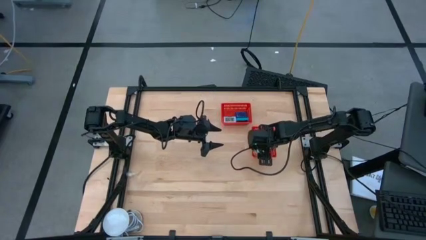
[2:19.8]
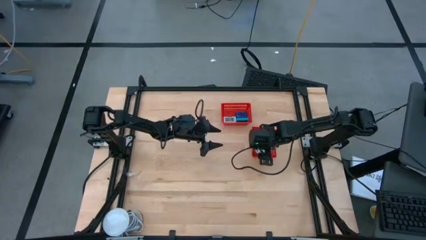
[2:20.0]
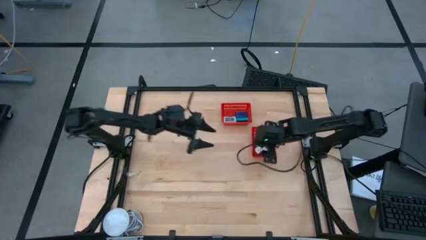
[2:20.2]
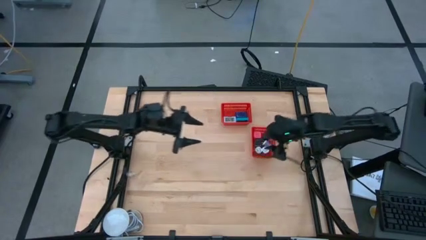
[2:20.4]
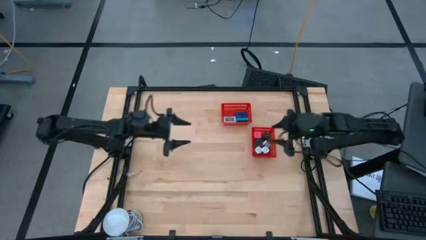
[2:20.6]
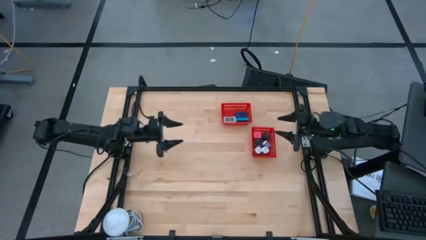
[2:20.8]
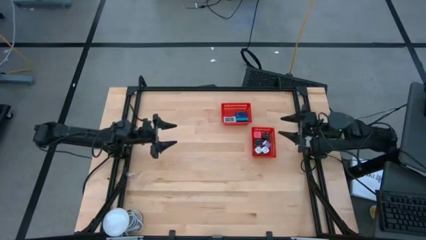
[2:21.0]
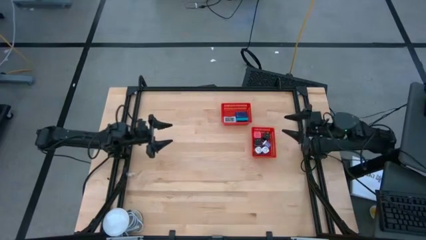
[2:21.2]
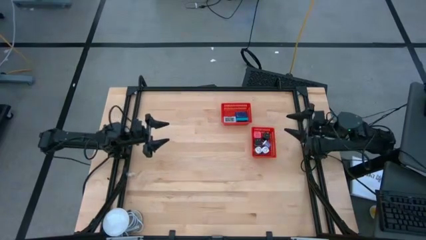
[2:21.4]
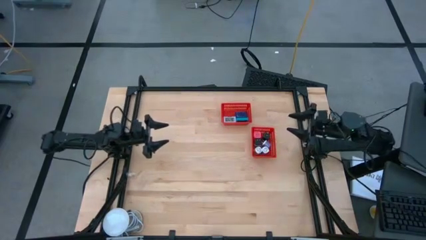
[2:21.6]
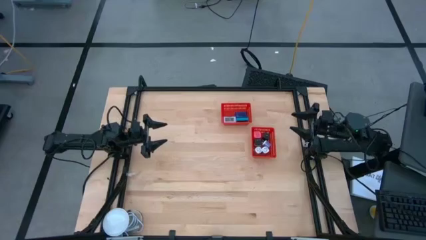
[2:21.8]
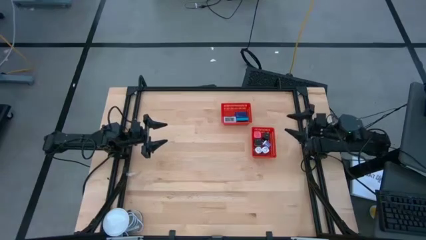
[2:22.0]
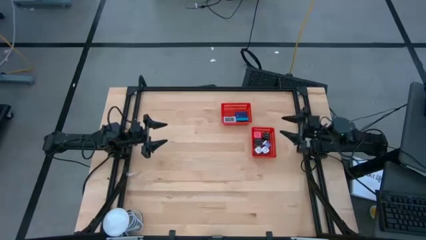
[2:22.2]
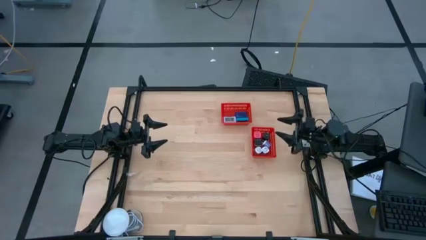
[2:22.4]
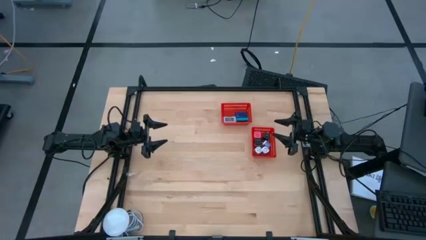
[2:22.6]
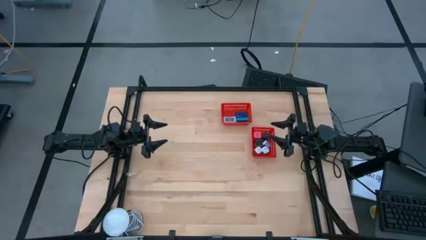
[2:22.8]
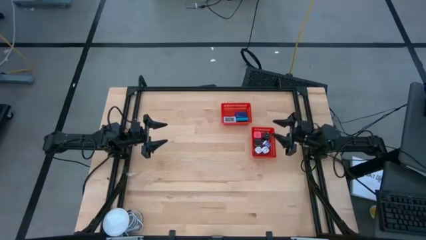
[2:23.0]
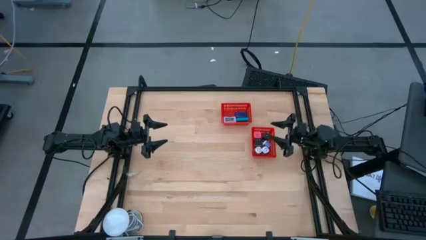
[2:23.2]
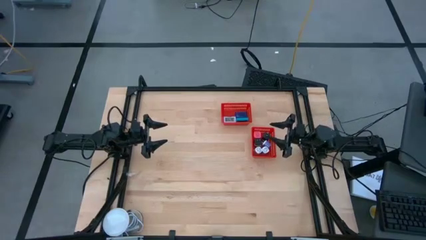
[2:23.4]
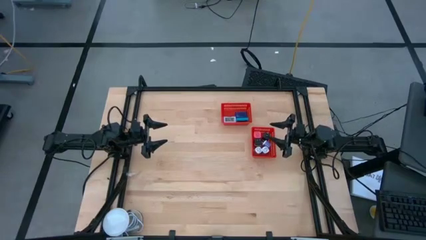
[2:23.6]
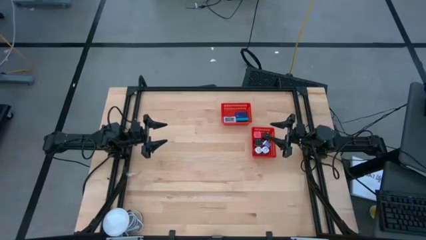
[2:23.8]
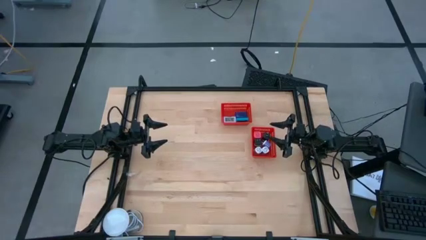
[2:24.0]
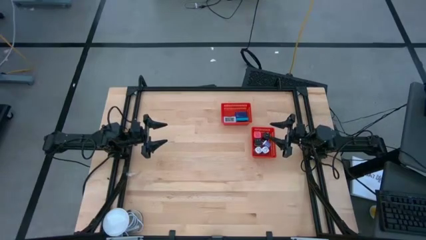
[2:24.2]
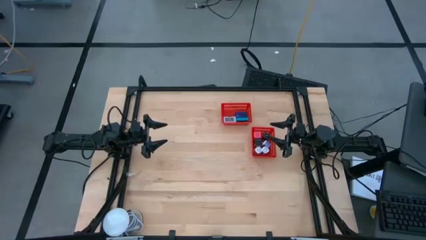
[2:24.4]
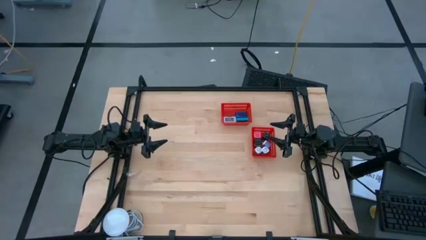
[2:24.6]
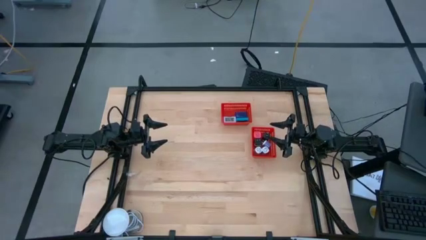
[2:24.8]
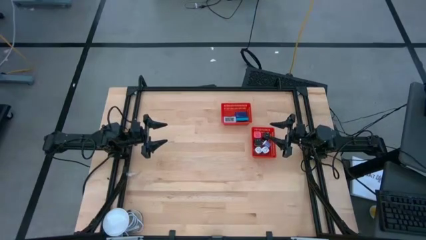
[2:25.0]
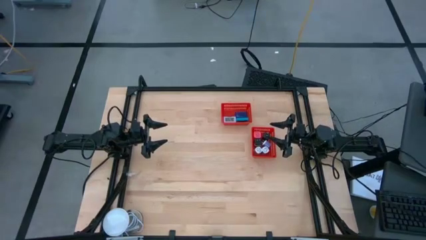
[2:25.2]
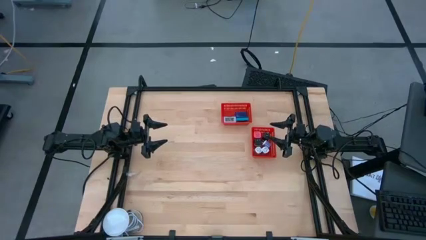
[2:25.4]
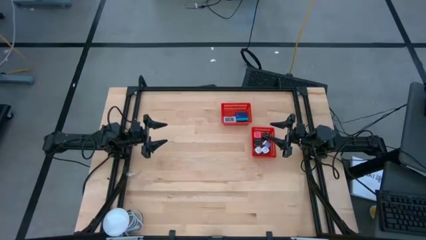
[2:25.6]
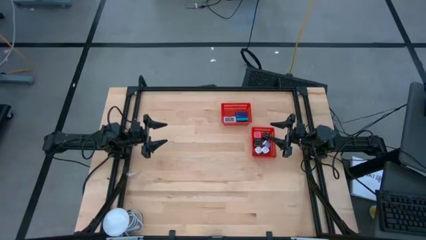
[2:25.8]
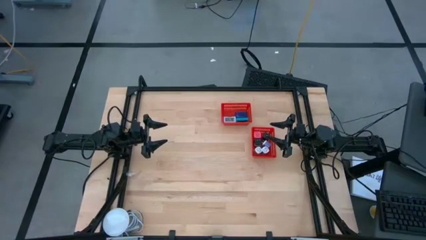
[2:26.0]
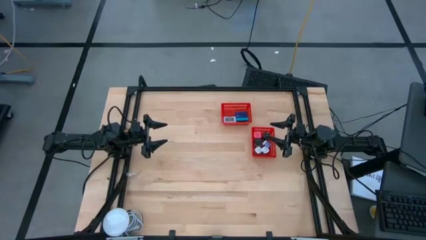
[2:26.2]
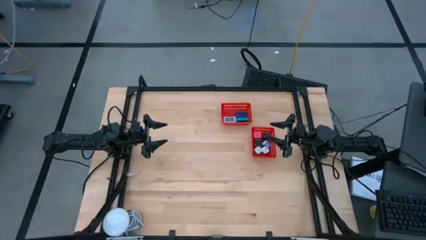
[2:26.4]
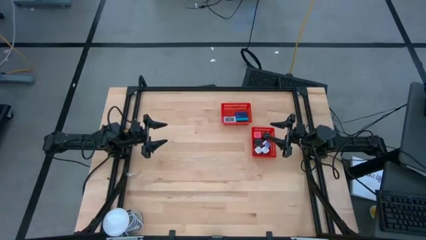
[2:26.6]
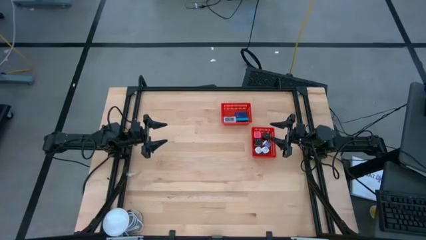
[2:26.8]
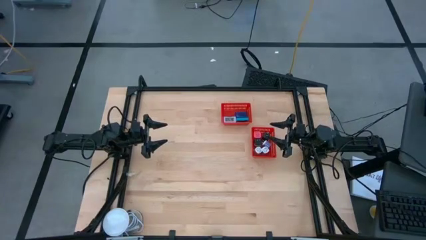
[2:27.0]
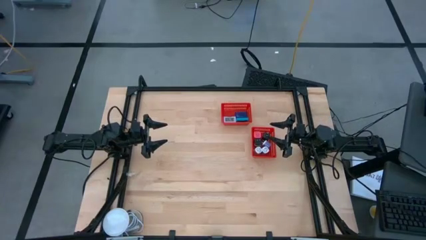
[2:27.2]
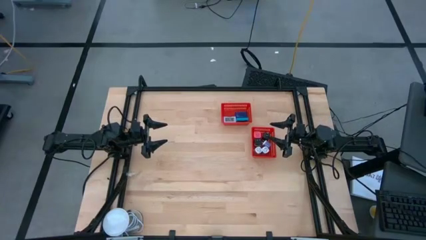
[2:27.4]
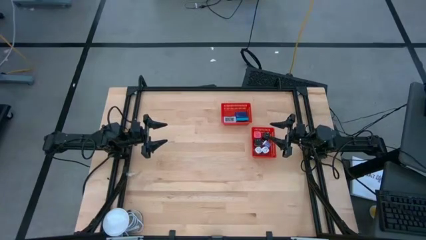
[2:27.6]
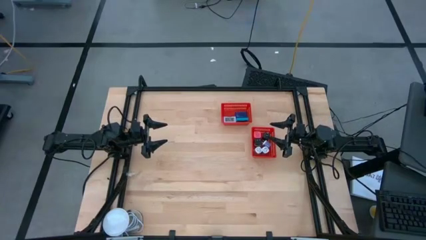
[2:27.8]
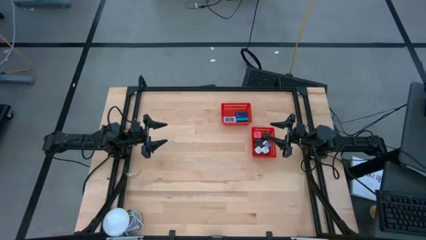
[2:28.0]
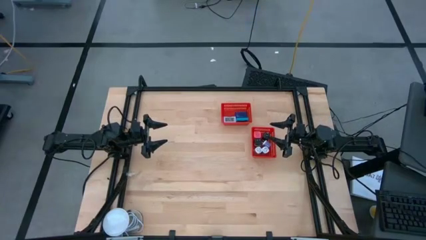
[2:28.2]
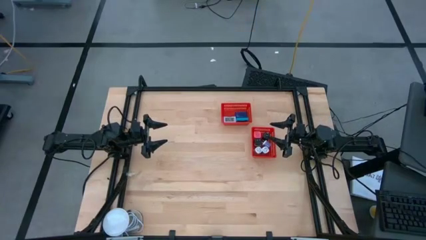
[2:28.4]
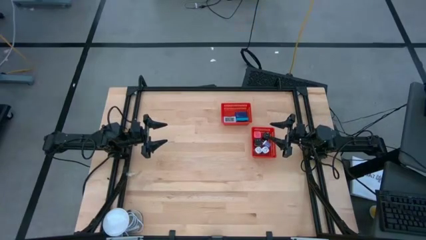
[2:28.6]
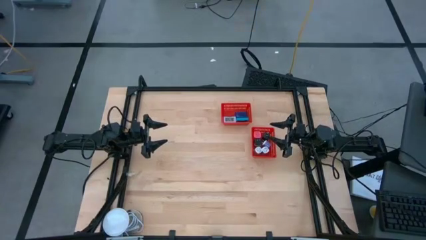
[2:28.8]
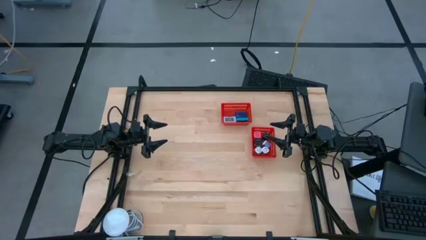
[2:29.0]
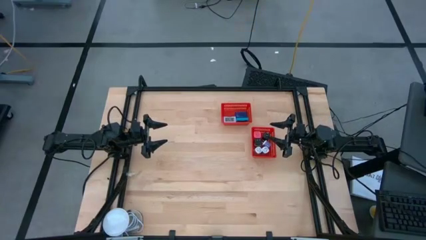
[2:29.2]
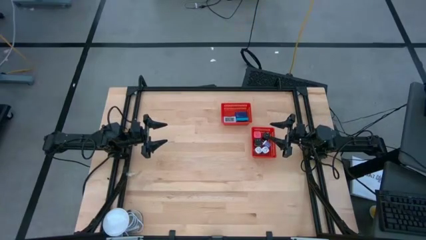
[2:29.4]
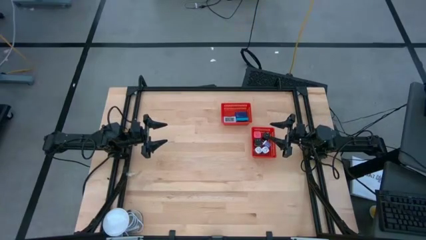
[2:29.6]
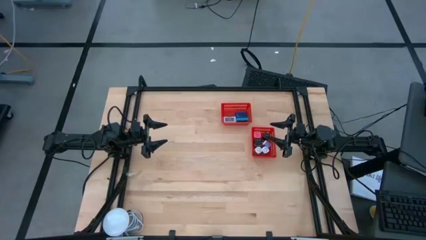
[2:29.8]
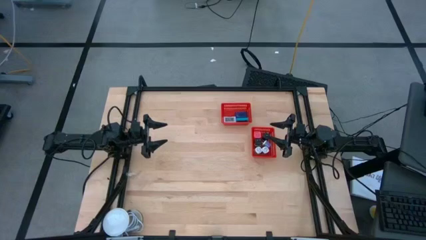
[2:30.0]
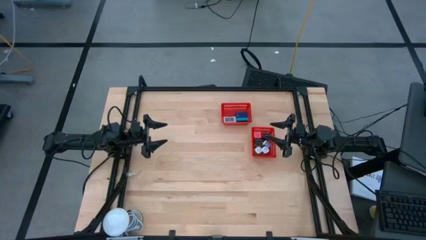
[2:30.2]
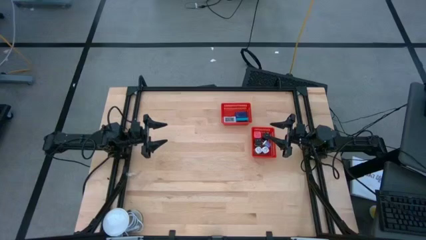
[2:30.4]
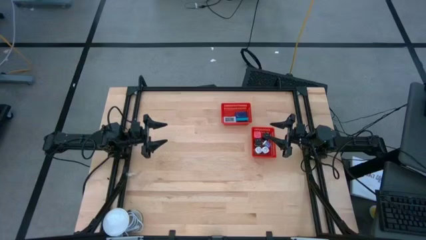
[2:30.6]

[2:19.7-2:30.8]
Task: Pick & Place Office items
Return to Home Position

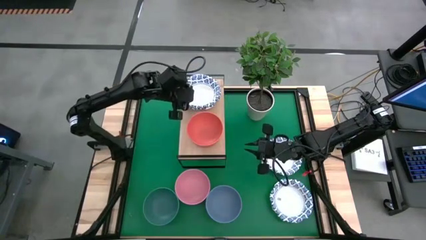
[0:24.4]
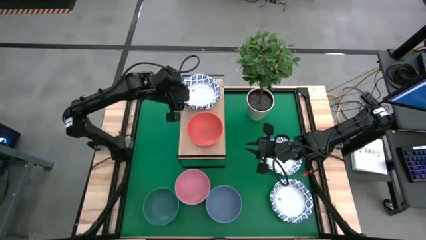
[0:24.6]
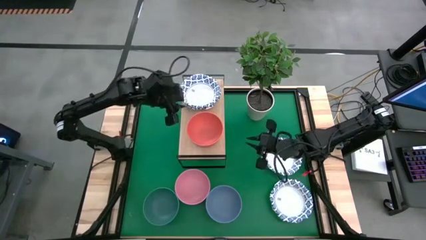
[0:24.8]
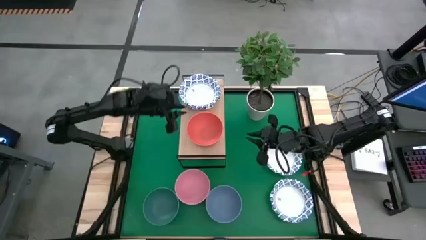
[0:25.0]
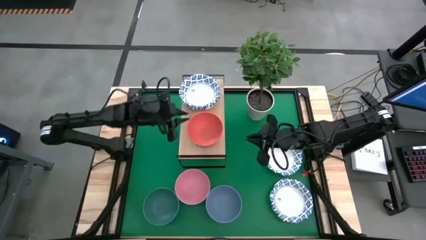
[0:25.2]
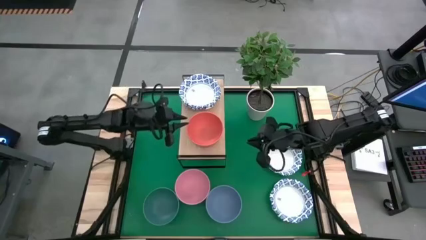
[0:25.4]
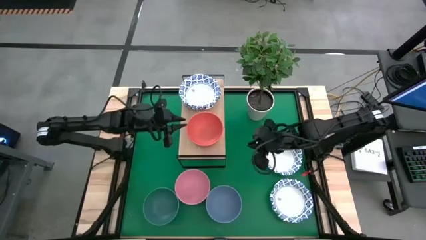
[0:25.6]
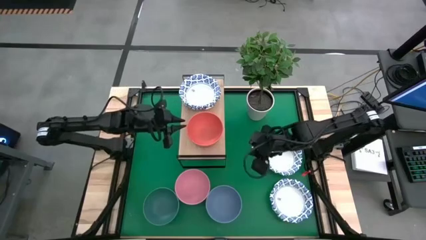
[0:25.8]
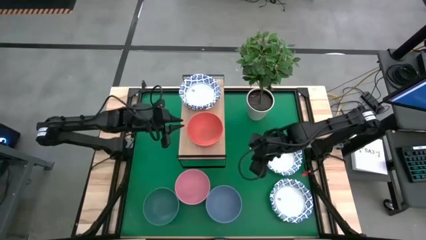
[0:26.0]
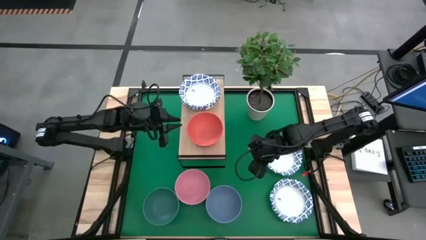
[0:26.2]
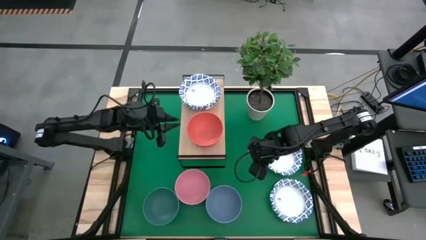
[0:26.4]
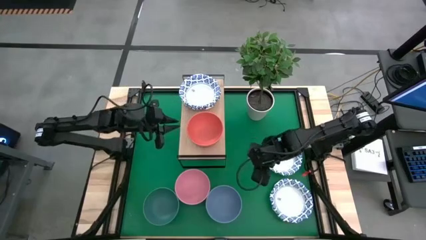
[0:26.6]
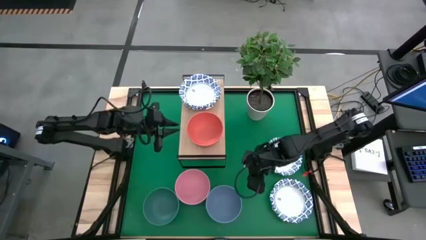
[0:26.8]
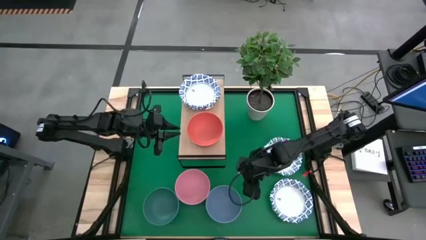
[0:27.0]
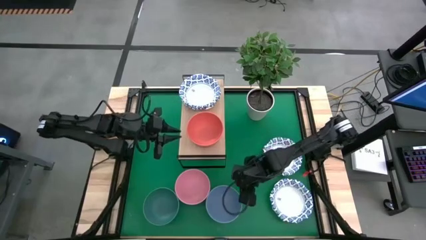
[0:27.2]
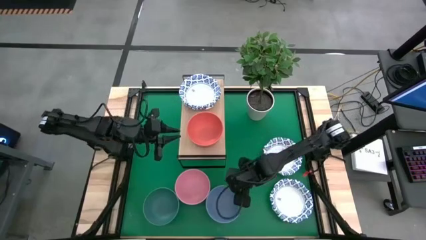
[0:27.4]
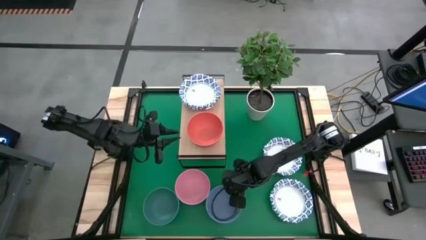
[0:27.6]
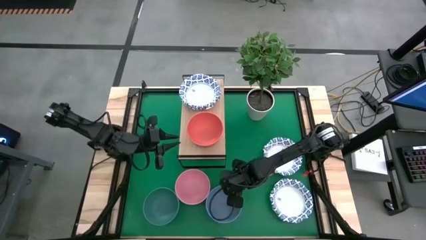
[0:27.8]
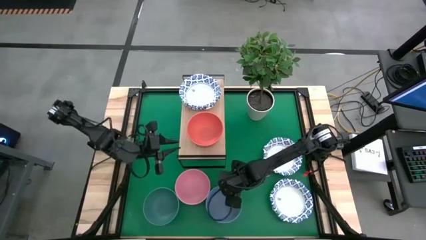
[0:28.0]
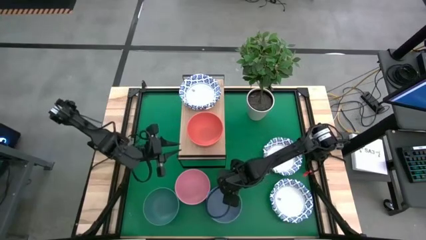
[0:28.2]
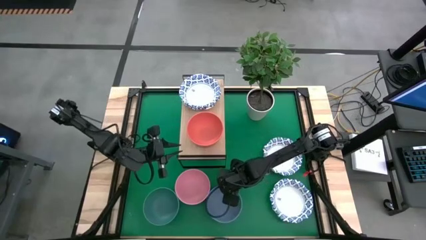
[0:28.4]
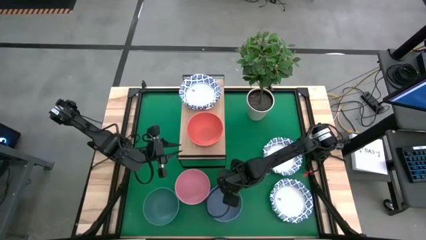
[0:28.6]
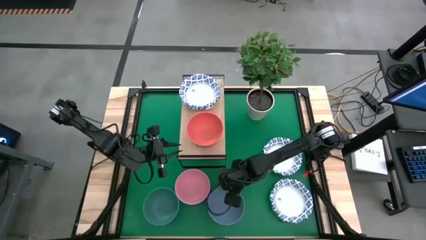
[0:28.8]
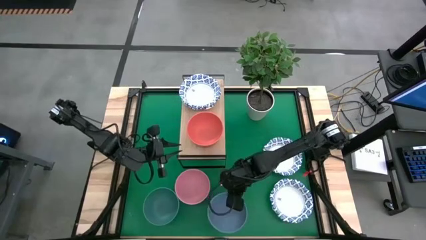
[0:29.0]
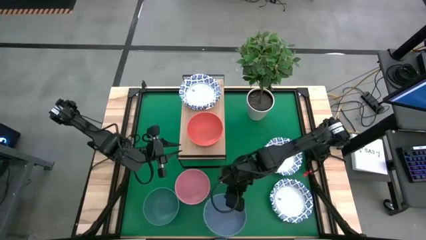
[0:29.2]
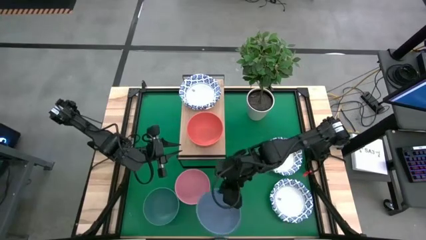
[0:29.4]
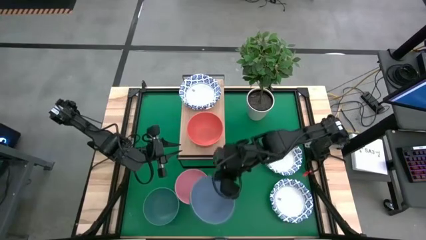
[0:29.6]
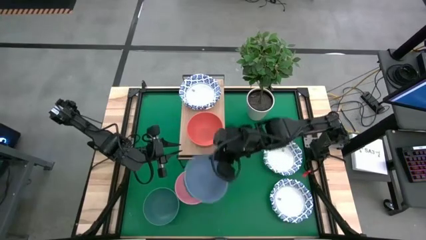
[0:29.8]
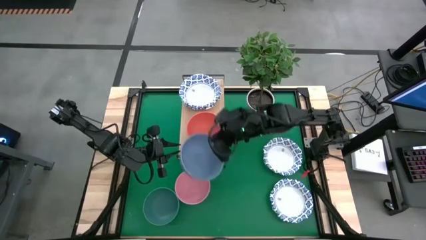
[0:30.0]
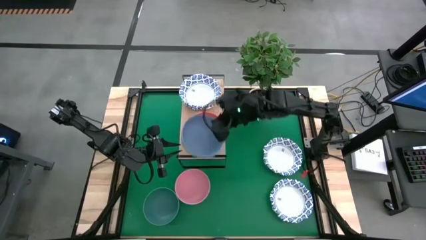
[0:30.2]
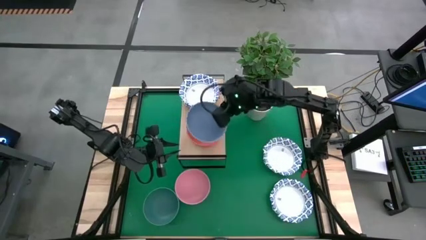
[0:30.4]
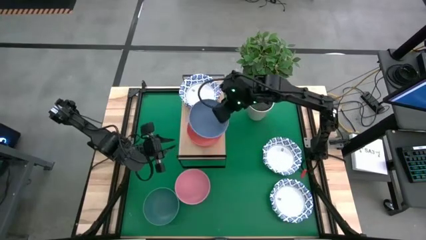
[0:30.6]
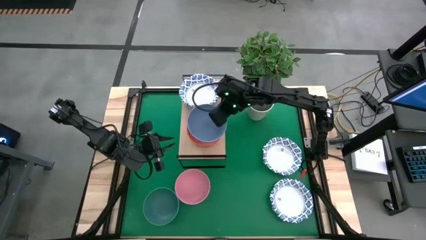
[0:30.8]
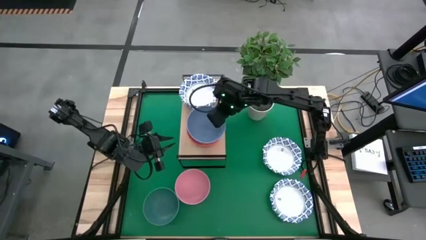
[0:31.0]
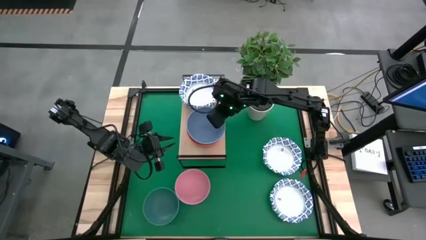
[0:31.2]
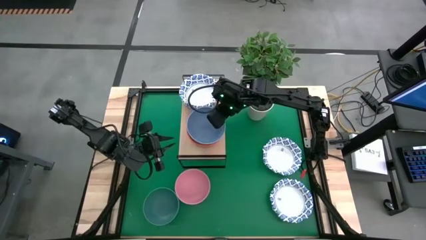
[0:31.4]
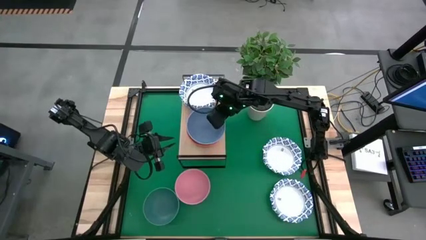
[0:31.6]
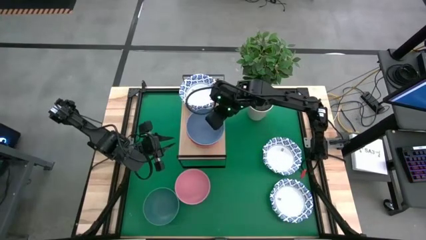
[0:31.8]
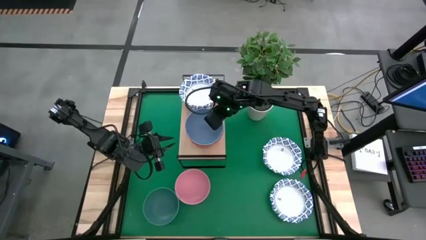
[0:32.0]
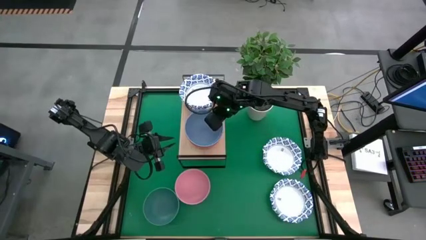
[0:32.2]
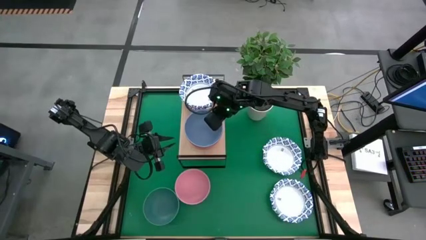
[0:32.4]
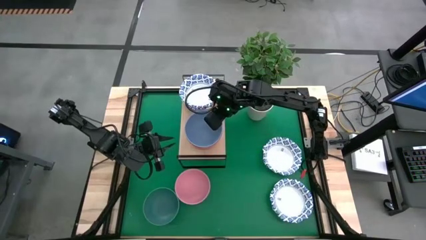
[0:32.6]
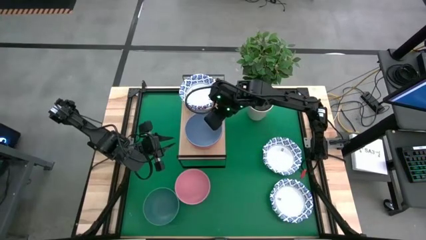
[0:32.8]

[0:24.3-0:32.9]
Task: Place and stack bowls onto a shelf
Stack the blue bowl on top of the orange bowl on the shelf
